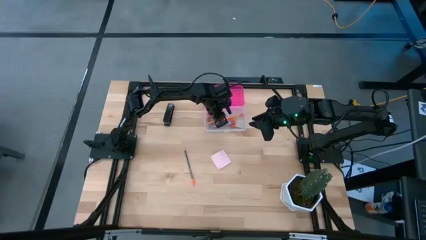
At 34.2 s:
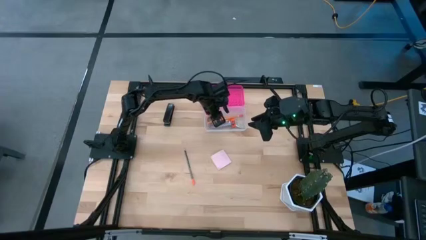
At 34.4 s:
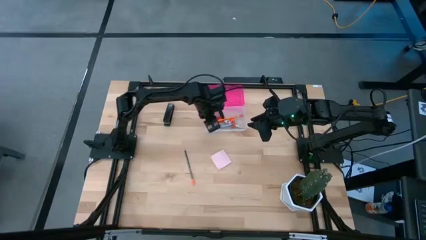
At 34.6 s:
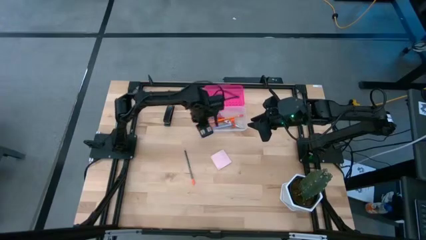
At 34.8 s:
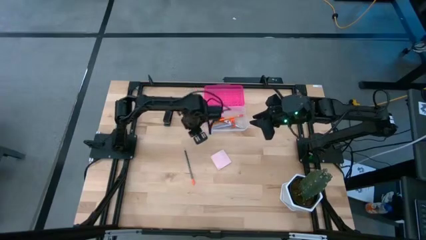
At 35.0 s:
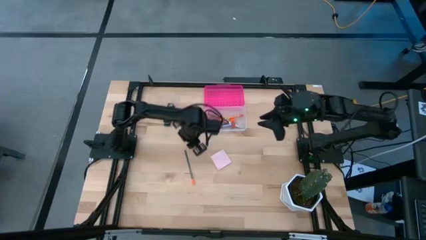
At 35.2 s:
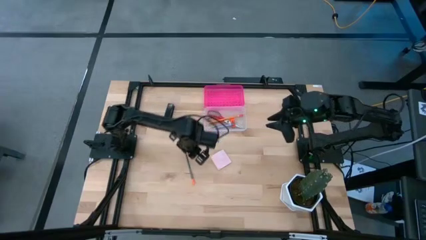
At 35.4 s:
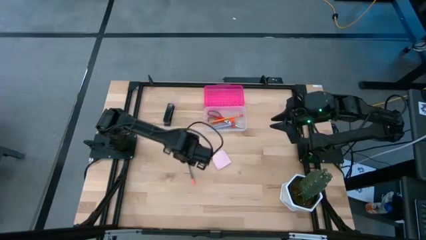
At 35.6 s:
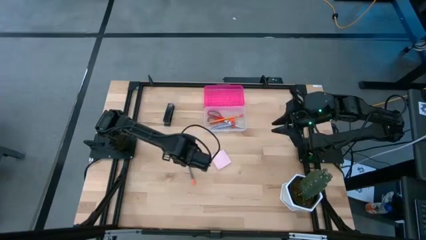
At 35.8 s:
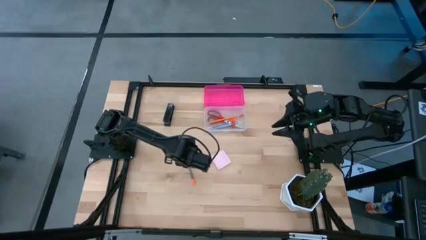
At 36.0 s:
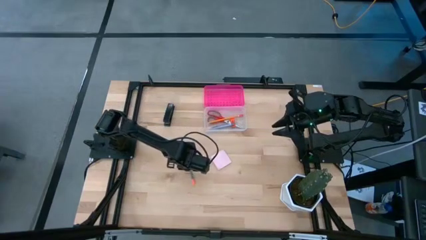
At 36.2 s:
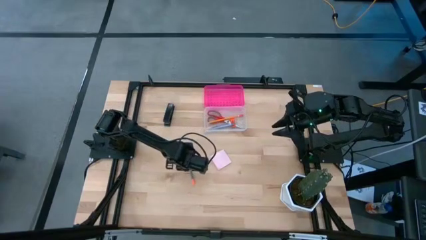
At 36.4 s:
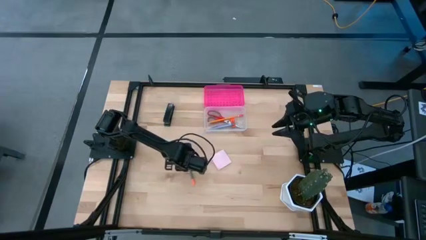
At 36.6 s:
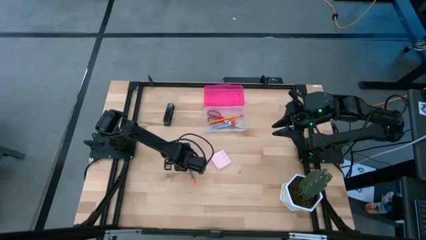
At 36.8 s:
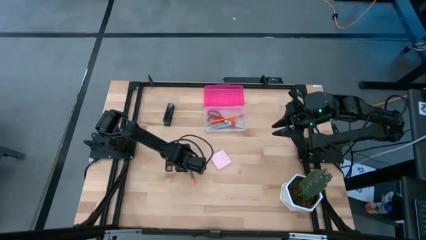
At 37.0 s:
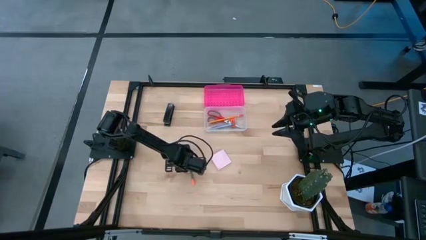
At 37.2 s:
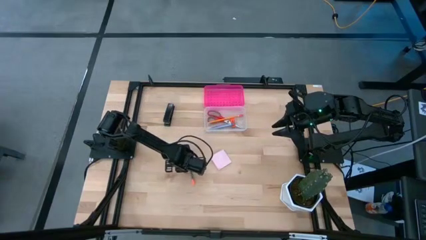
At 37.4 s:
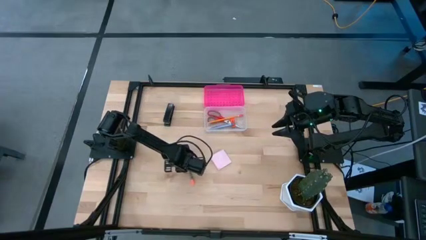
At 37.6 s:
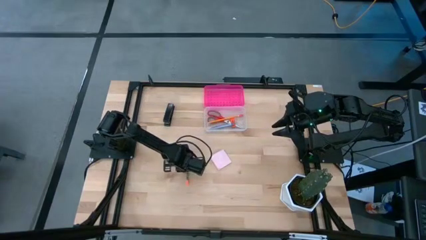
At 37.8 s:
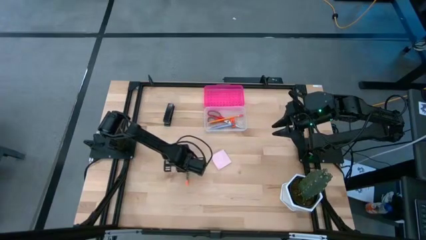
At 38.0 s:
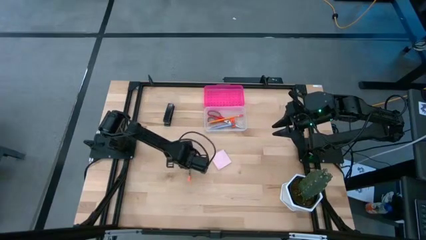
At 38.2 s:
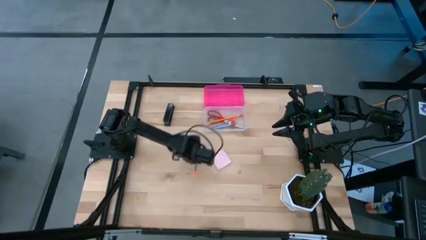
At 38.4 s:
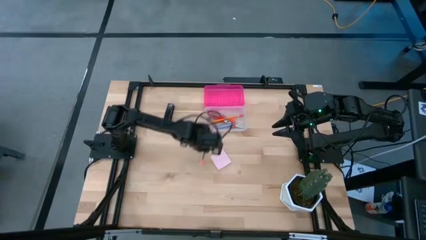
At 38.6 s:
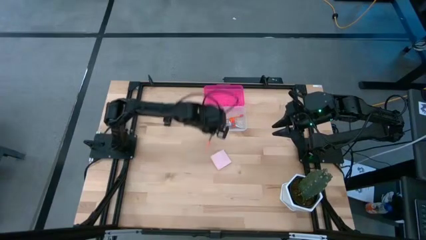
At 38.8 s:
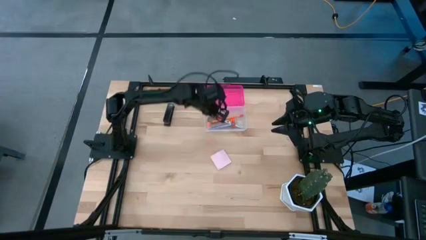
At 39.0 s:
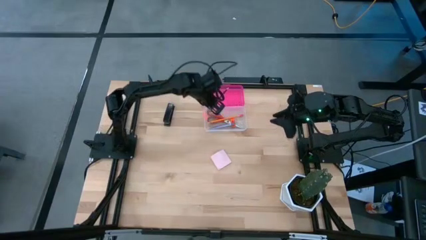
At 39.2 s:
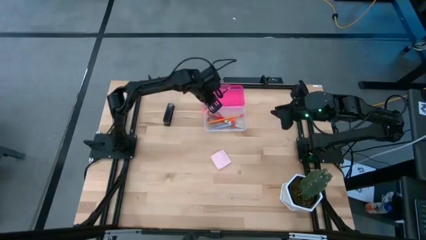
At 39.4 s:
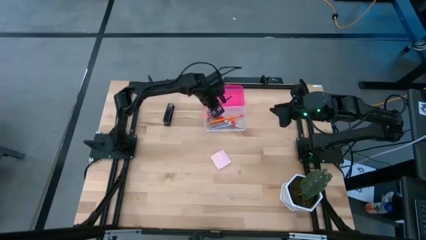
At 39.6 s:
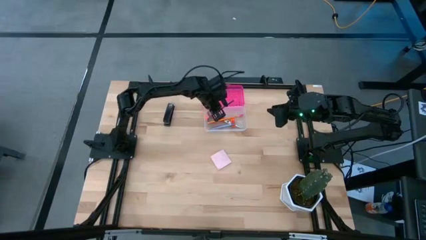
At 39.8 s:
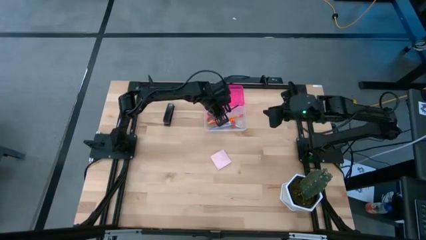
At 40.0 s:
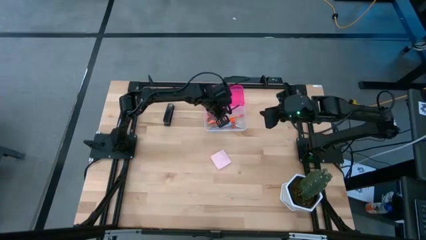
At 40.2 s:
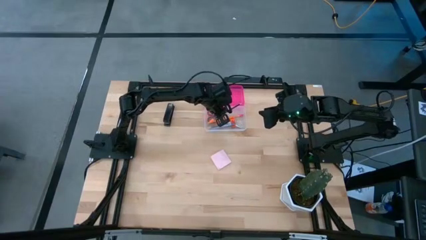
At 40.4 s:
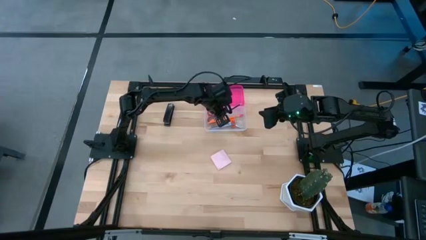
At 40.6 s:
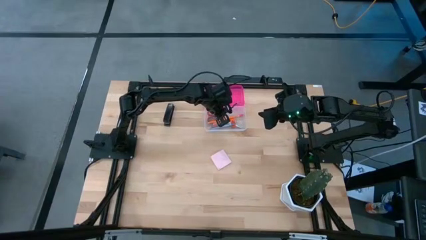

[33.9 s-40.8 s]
Task: Pack school essentials
Put the black pencil into the supply box

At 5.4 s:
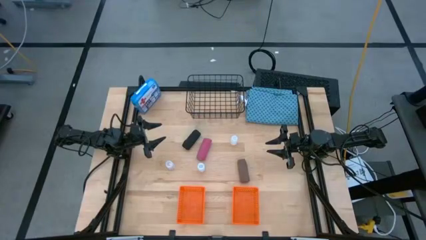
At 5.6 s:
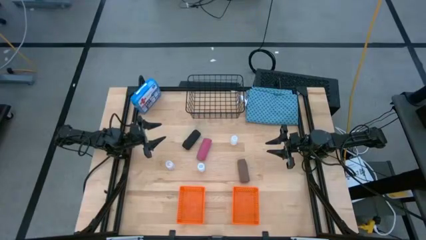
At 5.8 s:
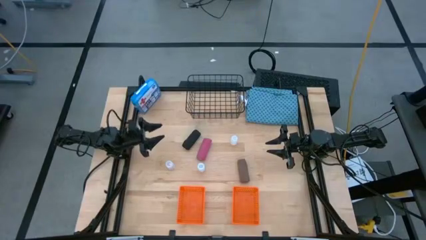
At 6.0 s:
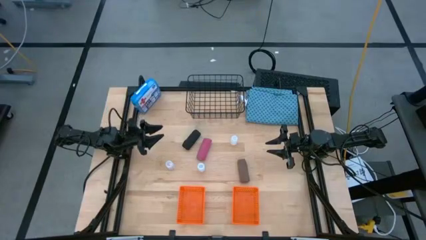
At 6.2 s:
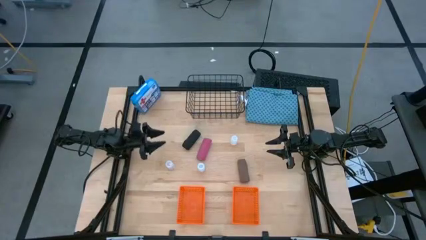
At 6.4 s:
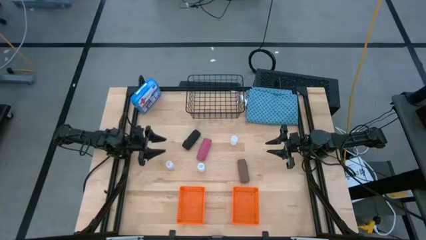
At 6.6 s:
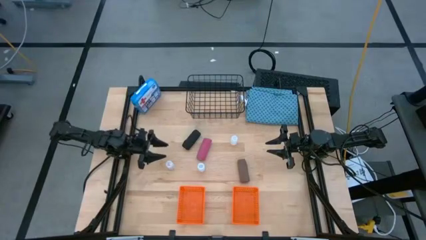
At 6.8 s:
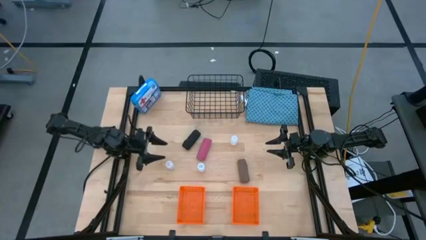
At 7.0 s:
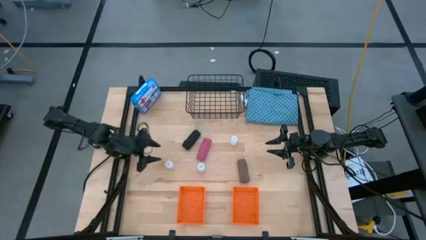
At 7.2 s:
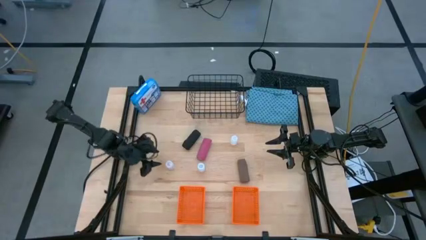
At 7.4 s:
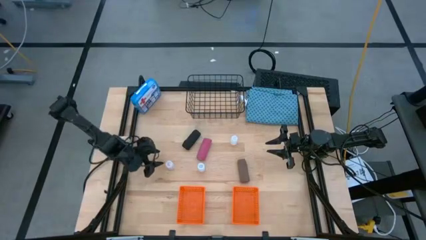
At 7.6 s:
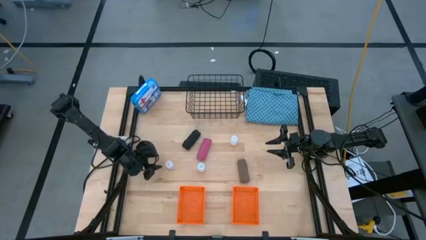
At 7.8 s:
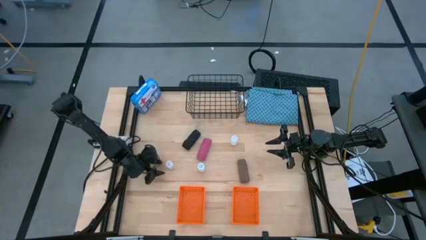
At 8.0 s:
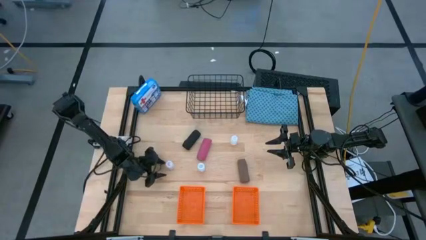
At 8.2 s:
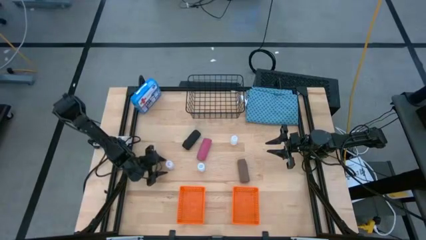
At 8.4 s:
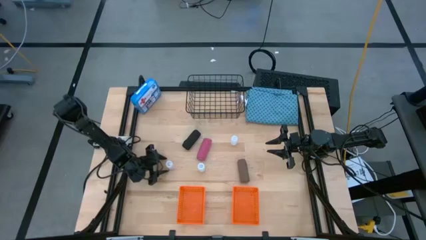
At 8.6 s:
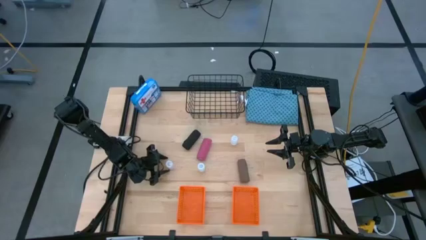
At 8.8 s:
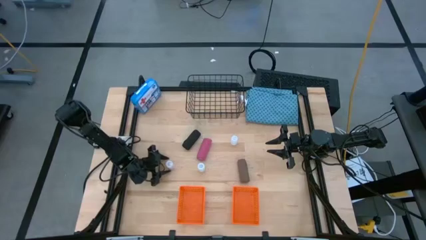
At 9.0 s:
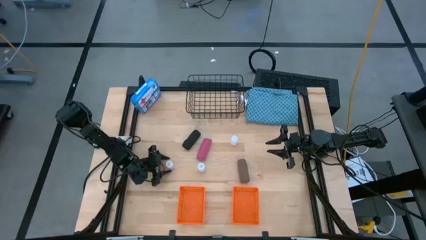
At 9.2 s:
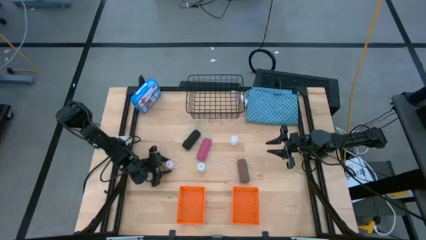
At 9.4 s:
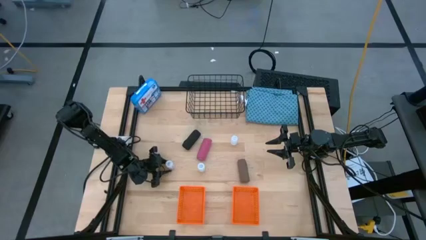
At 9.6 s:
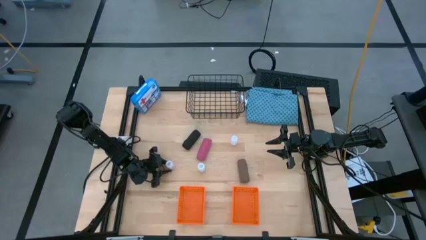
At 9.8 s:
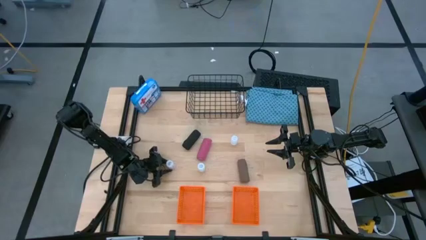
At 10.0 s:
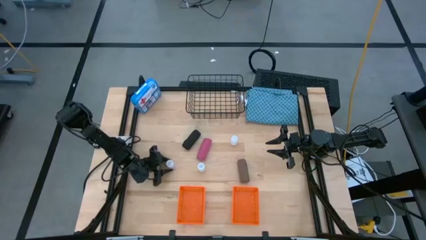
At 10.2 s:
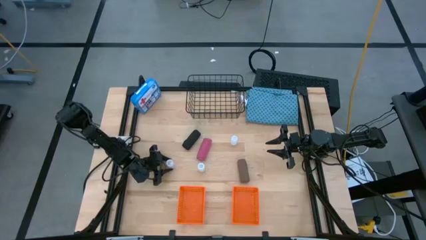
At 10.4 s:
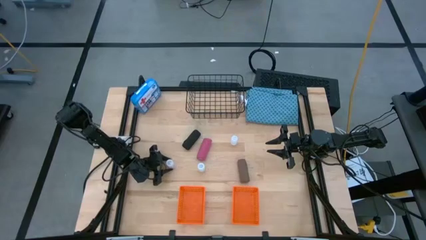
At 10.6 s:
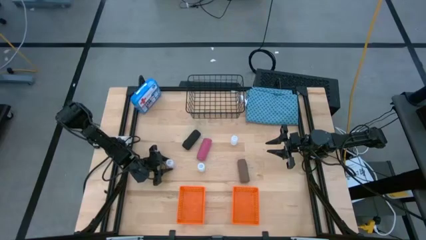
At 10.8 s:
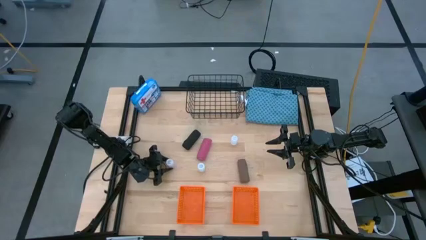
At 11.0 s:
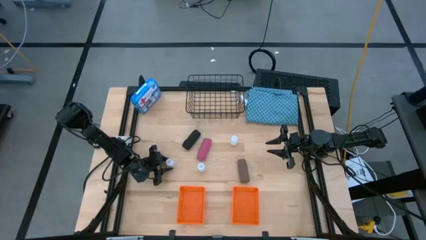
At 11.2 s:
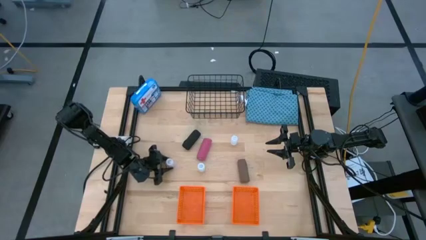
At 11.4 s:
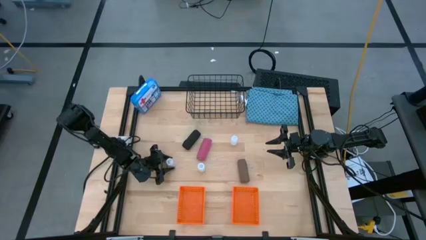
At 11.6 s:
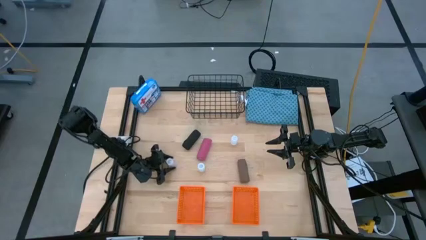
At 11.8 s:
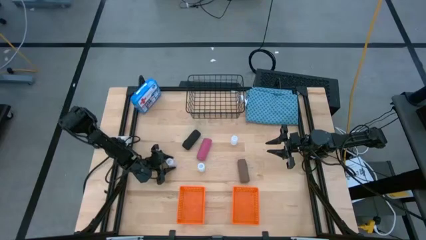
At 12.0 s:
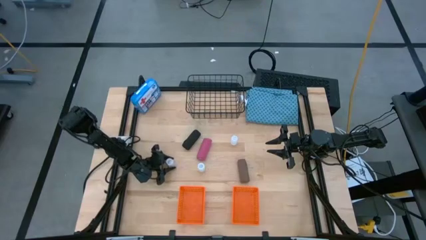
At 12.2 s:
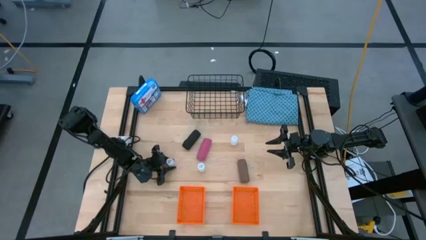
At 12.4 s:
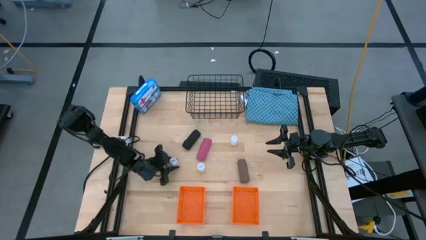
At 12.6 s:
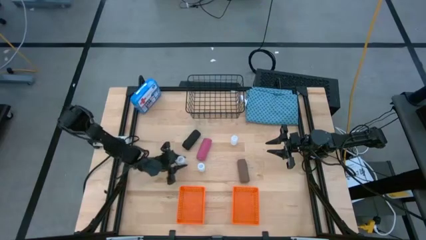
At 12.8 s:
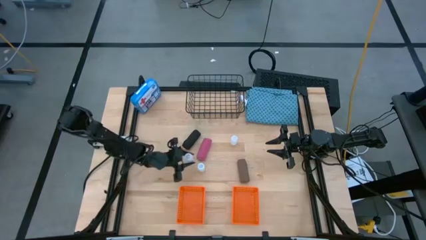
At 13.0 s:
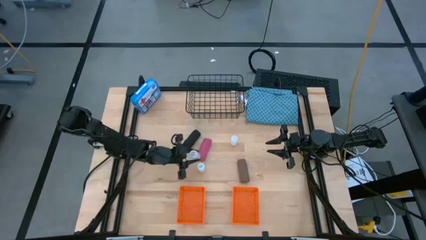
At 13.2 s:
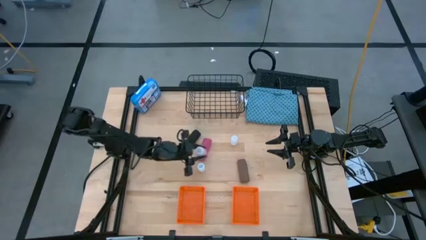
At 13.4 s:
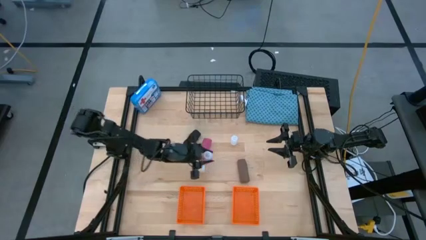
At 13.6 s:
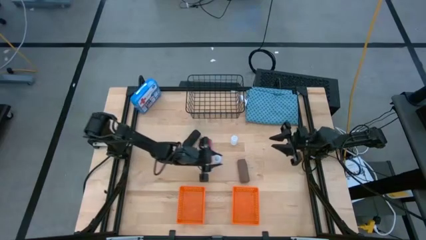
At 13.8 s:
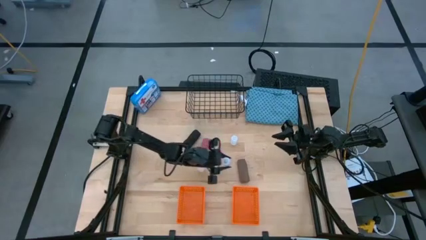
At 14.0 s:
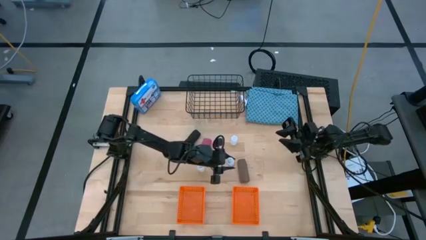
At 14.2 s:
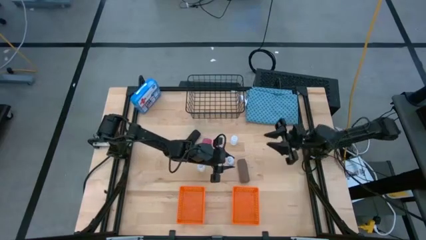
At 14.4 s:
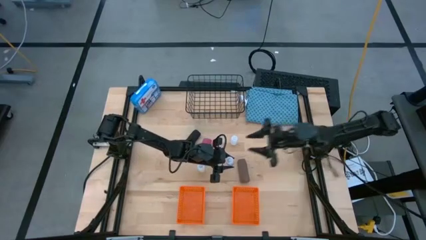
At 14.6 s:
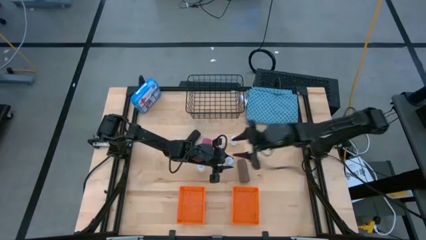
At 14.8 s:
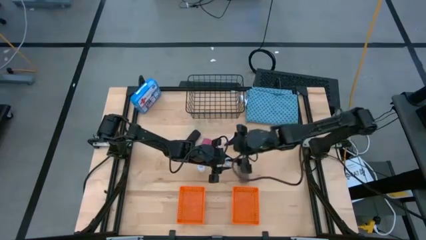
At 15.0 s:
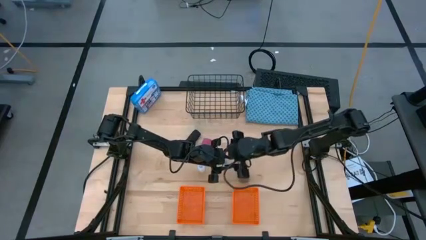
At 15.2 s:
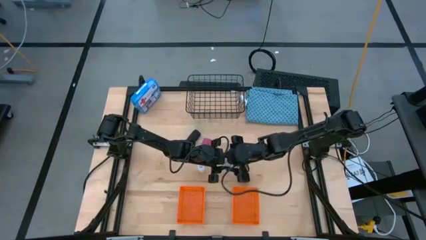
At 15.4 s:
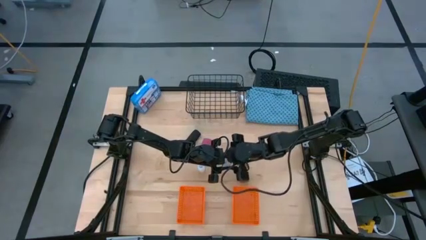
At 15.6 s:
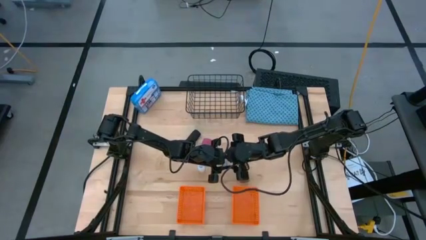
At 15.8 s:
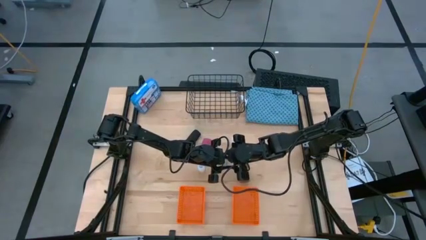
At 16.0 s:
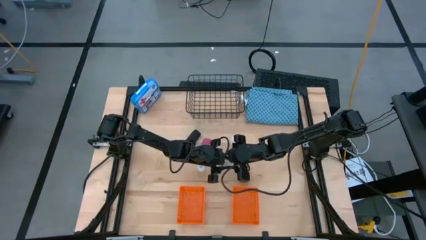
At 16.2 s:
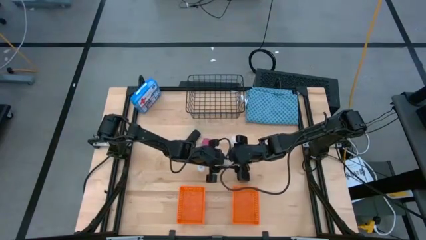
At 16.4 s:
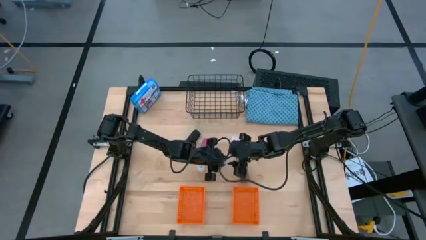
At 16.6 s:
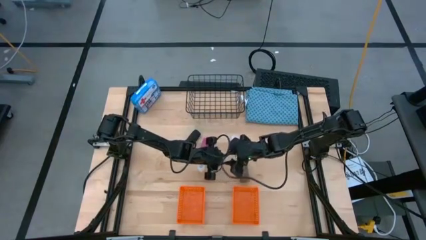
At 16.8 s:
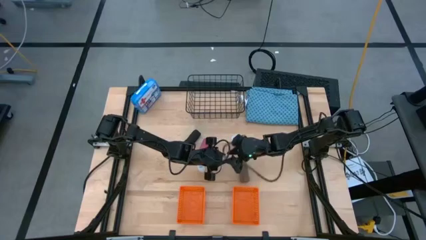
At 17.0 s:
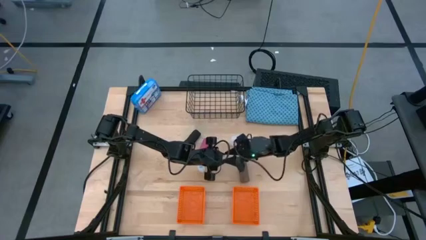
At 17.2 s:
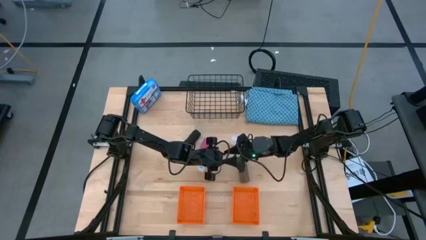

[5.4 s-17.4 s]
Task: Pick & Place Medicine items
Put the bottom left transparent pill bottle into the right orange basket
